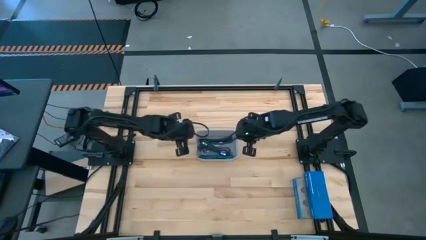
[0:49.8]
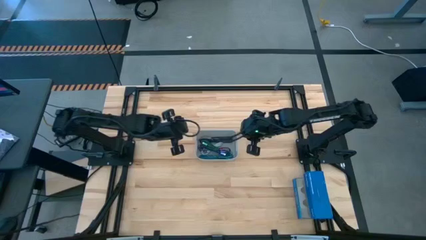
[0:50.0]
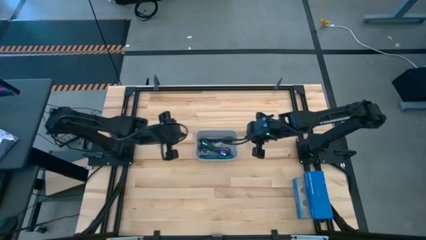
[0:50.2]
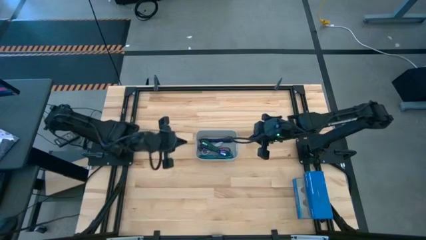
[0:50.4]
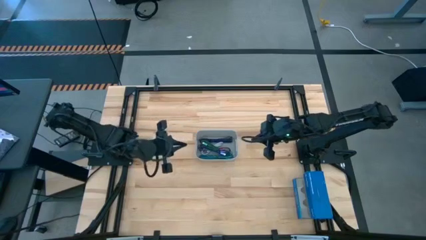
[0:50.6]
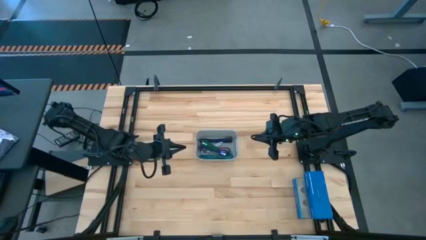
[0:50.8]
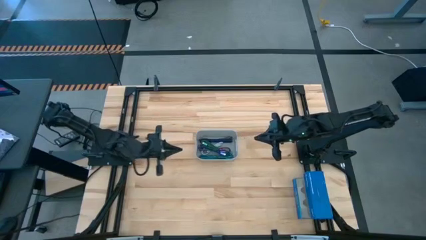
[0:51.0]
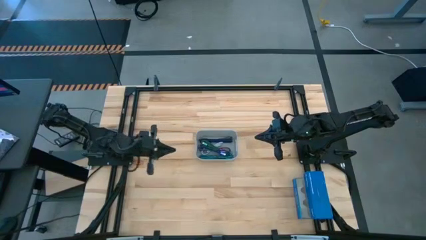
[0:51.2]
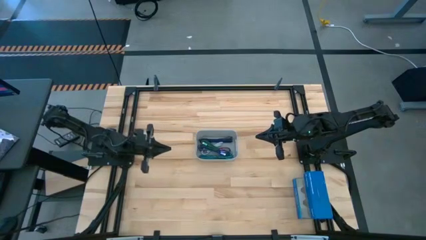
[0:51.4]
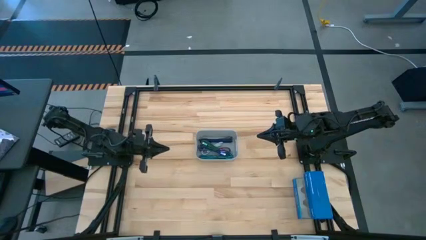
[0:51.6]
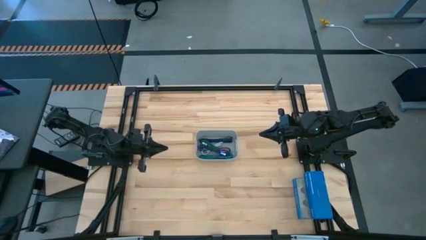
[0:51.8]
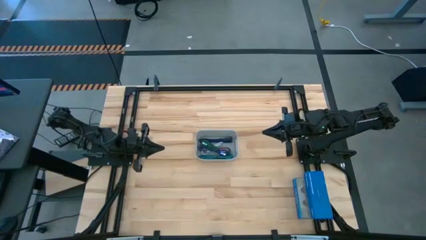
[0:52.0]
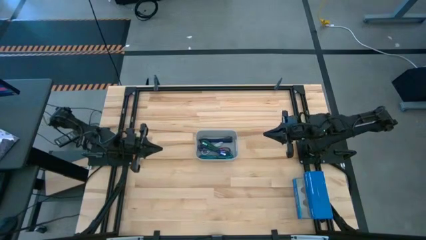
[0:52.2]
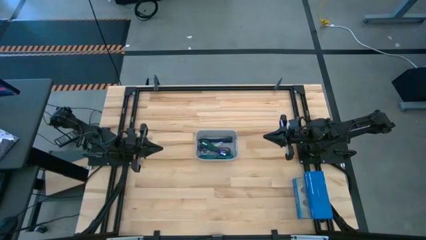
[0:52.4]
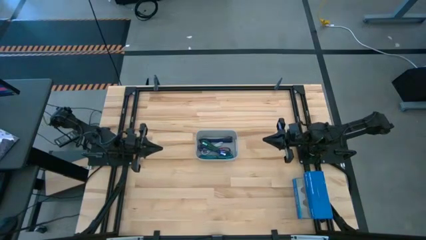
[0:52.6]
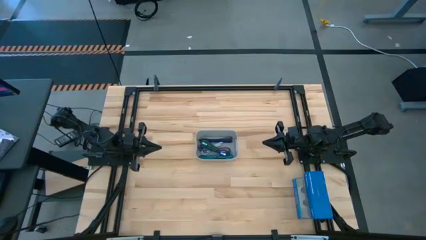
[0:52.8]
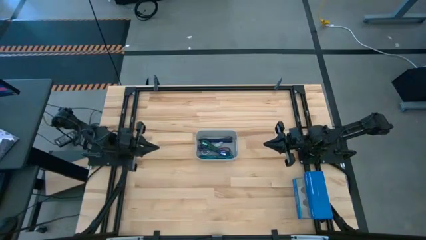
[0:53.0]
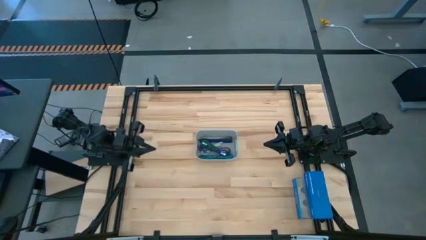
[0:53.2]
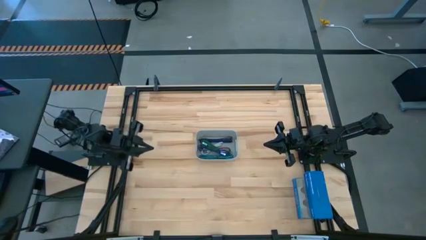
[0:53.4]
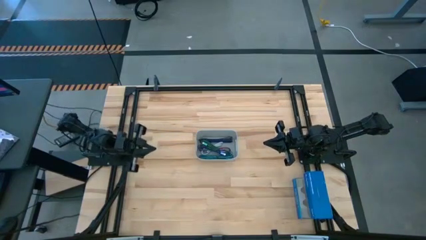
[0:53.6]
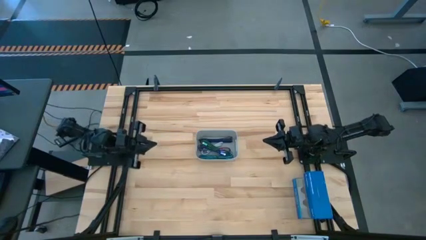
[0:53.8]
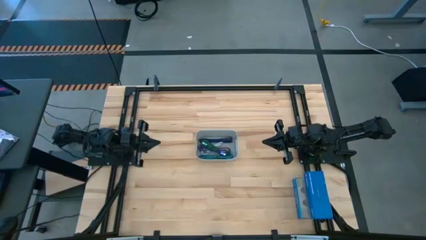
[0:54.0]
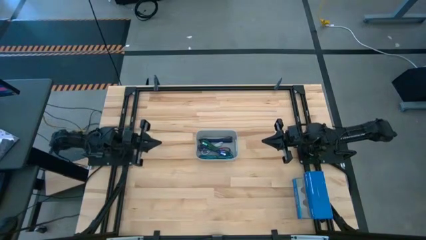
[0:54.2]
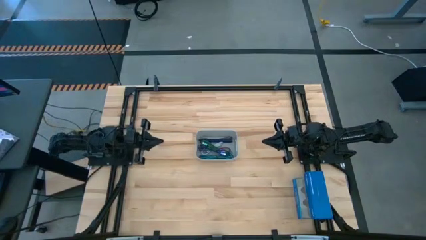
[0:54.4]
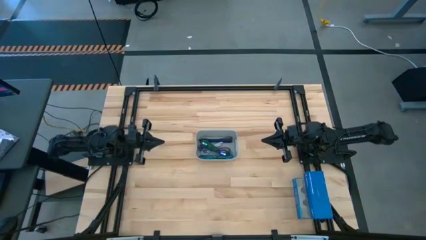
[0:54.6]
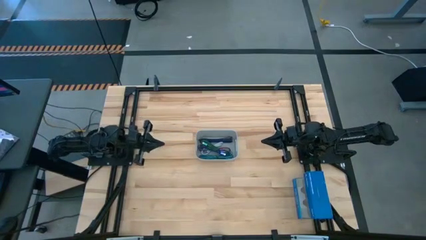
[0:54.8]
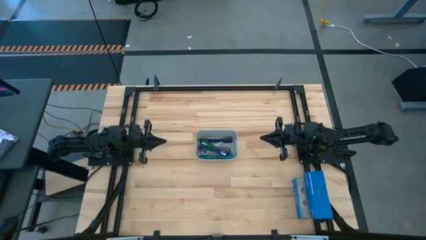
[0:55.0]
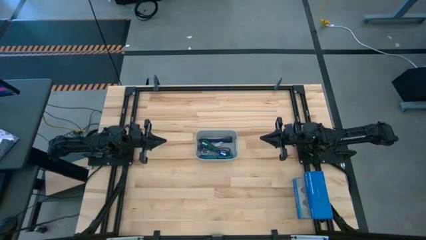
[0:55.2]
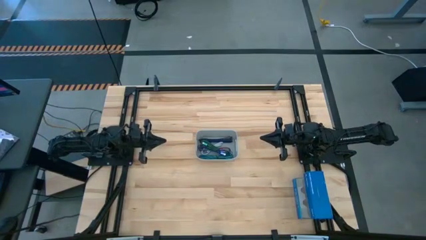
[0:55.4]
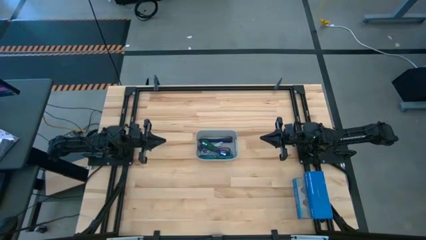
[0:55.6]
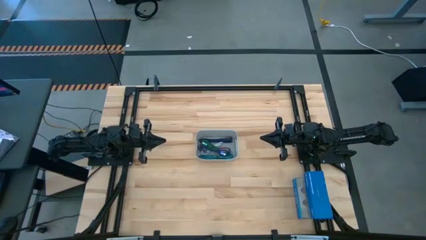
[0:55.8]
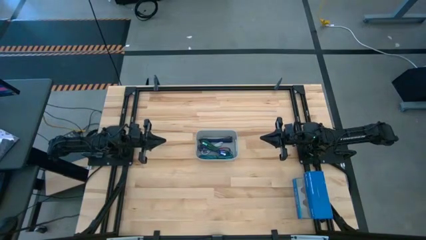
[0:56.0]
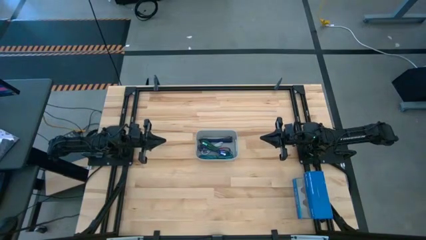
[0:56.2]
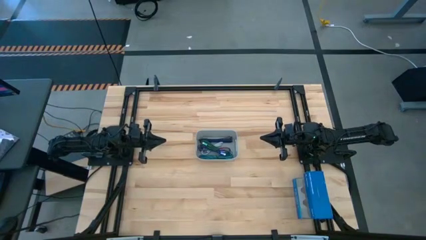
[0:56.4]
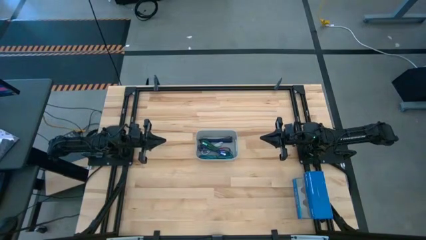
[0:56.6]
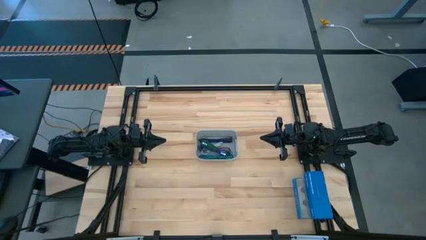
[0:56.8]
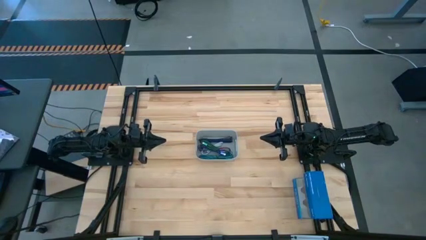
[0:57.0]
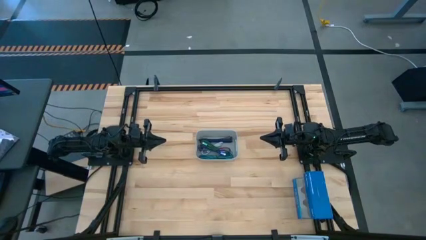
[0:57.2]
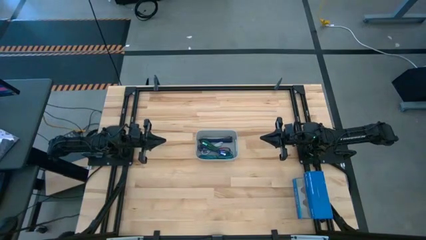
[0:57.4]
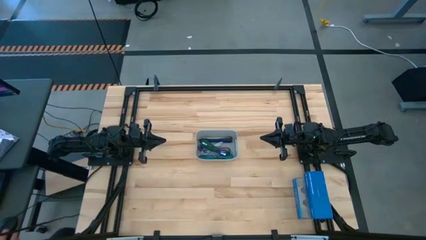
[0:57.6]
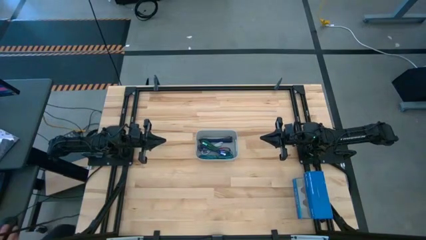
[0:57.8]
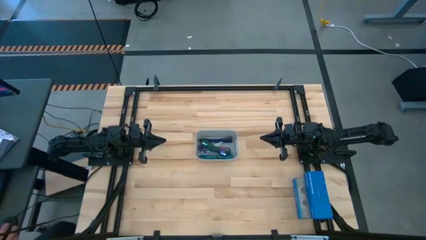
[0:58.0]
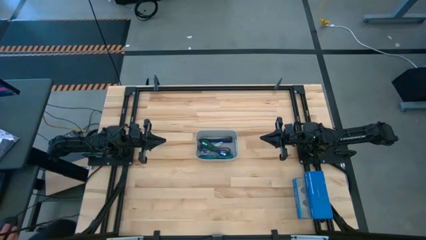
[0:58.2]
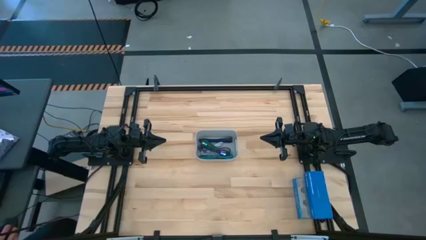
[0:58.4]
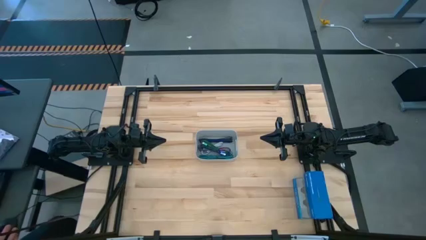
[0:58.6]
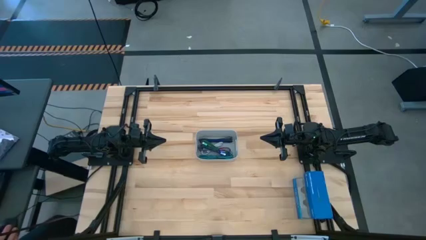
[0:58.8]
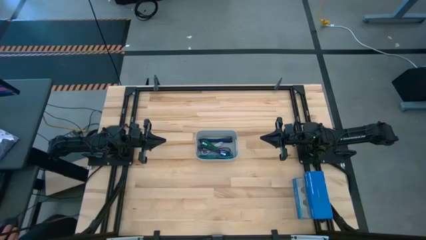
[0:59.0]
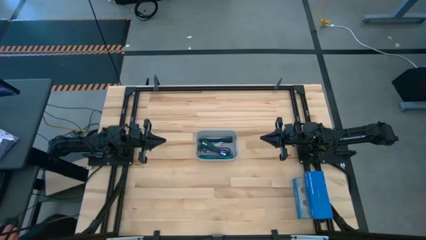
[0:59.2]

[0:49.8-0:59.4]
Task: Pick and place USB-C Cables
Return to Home Position

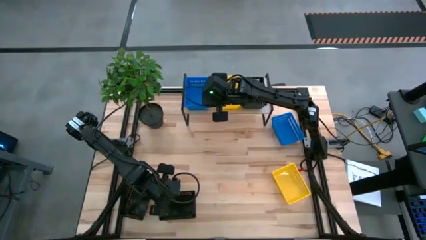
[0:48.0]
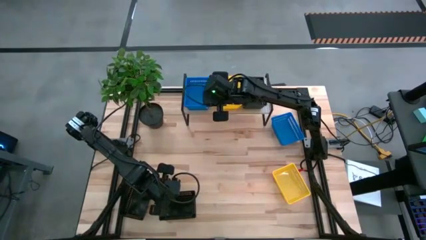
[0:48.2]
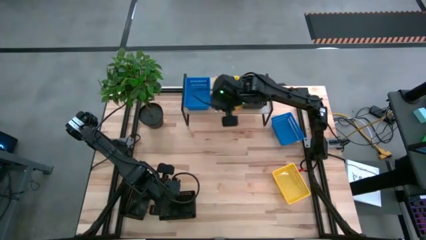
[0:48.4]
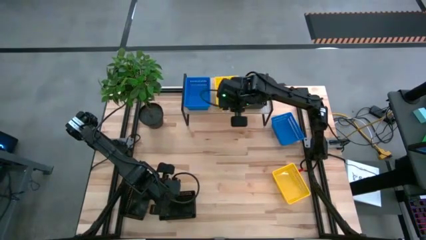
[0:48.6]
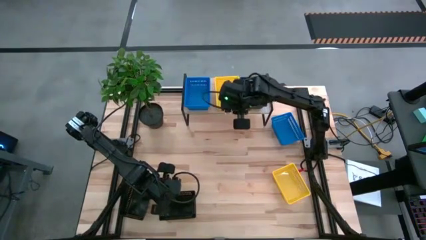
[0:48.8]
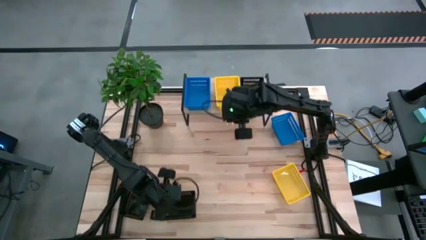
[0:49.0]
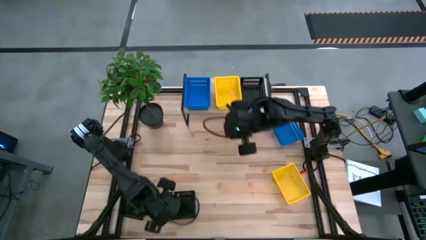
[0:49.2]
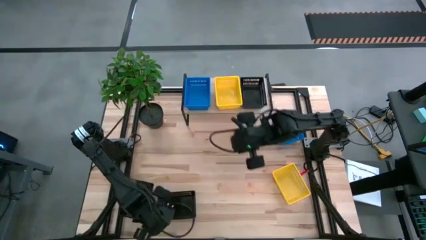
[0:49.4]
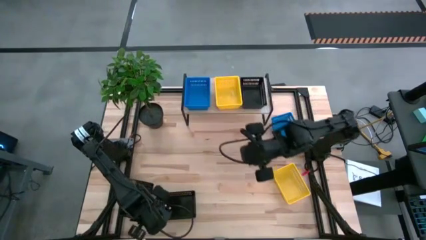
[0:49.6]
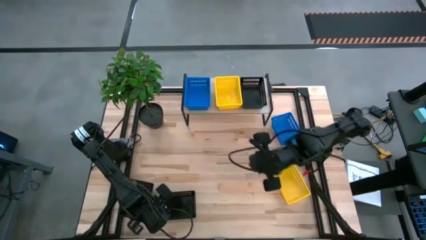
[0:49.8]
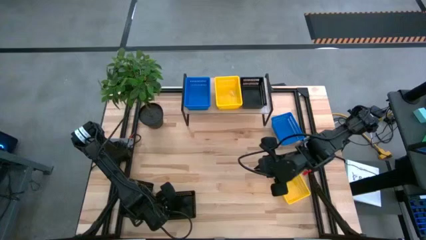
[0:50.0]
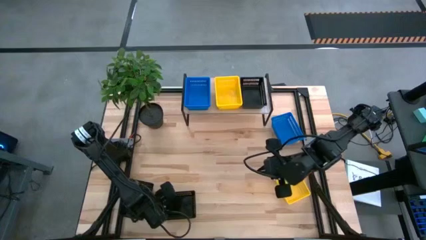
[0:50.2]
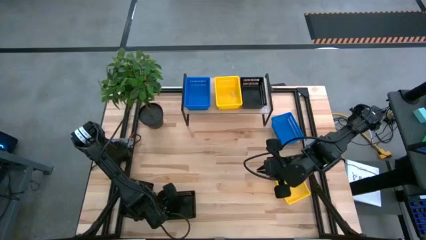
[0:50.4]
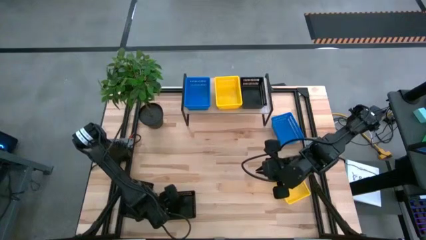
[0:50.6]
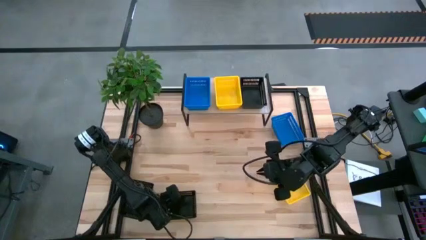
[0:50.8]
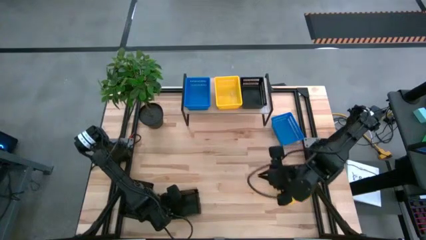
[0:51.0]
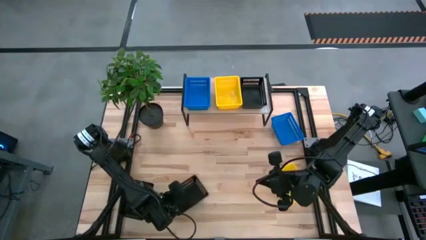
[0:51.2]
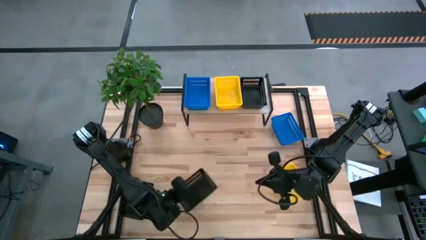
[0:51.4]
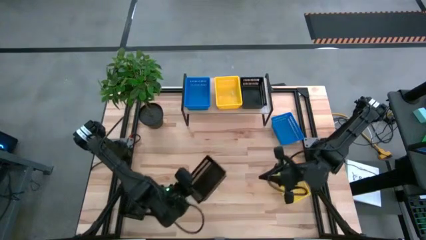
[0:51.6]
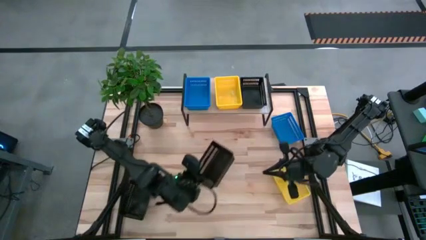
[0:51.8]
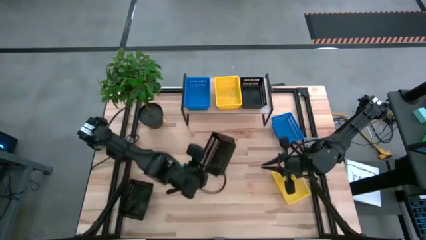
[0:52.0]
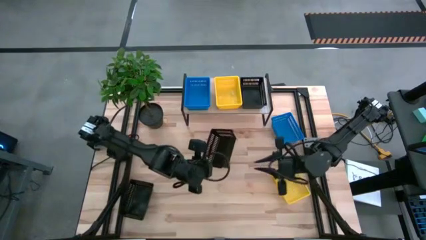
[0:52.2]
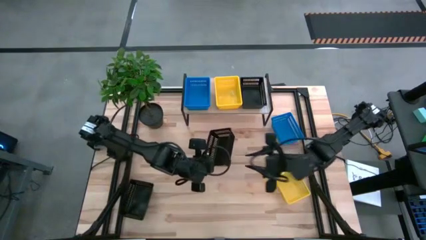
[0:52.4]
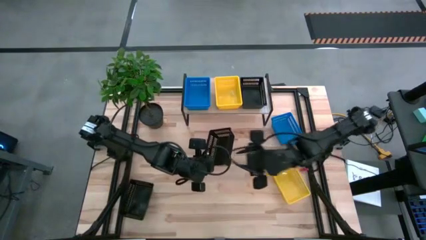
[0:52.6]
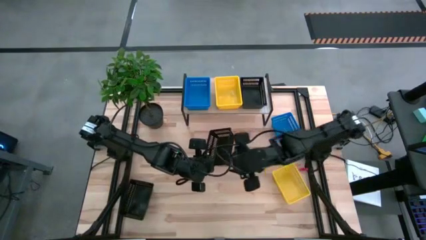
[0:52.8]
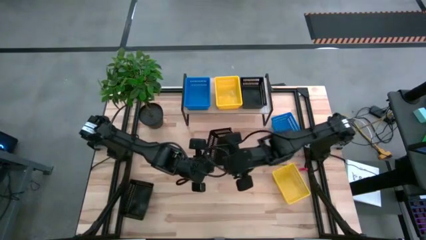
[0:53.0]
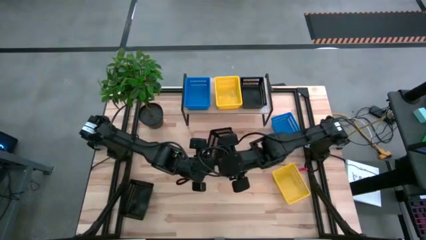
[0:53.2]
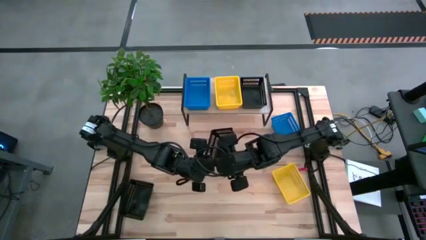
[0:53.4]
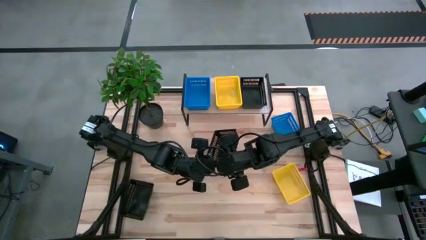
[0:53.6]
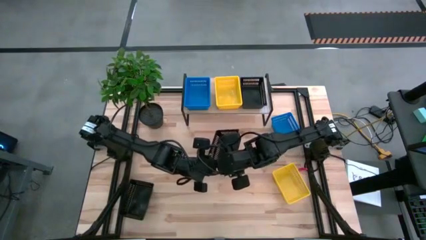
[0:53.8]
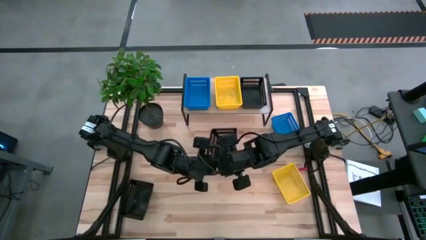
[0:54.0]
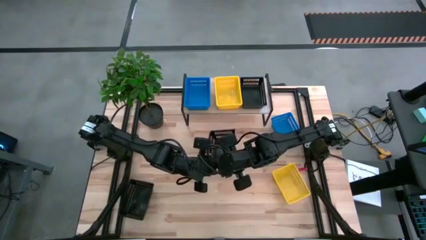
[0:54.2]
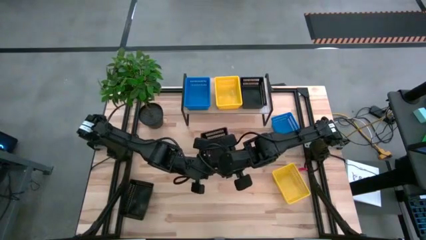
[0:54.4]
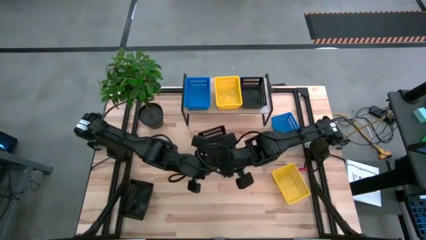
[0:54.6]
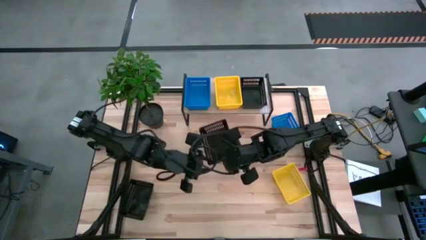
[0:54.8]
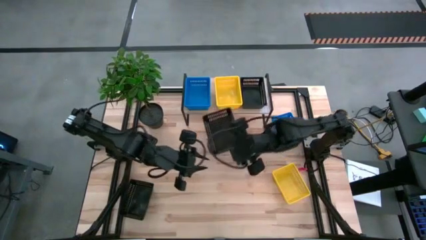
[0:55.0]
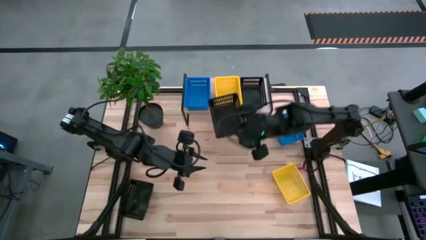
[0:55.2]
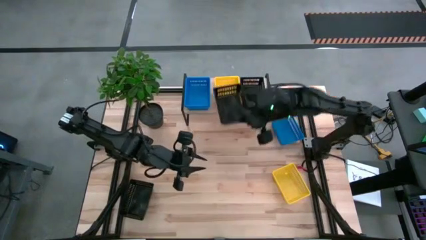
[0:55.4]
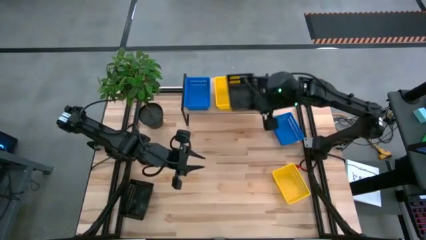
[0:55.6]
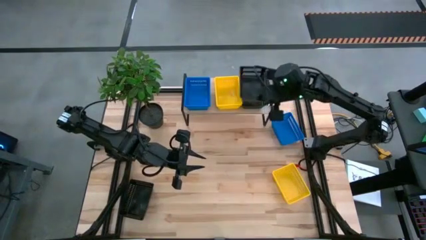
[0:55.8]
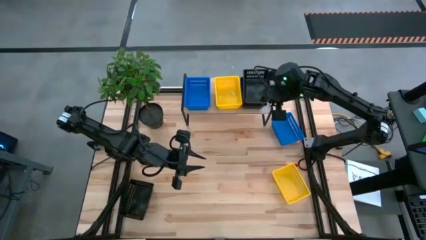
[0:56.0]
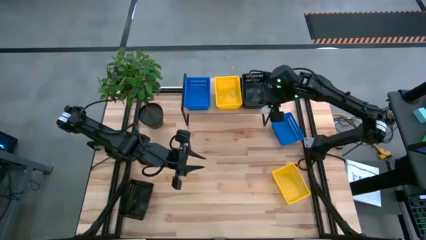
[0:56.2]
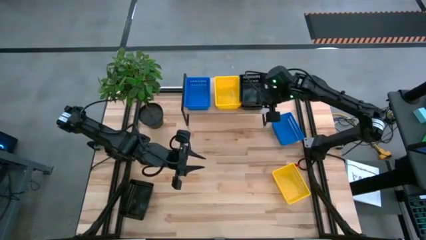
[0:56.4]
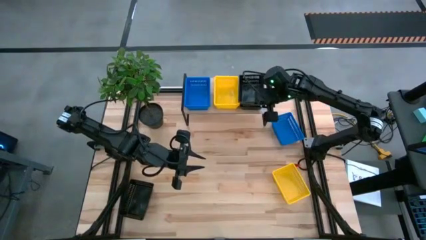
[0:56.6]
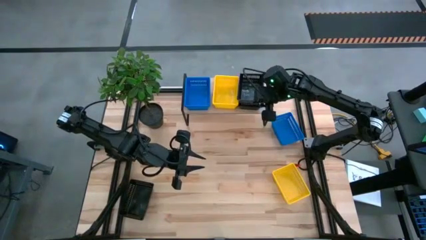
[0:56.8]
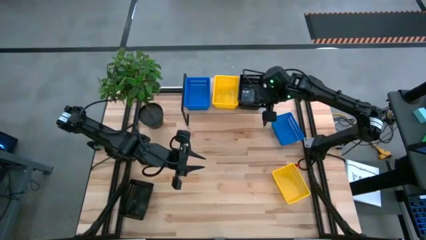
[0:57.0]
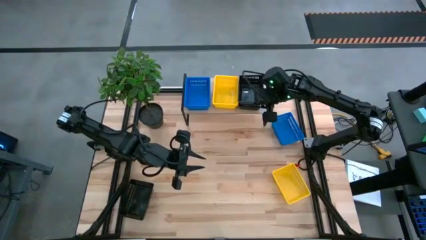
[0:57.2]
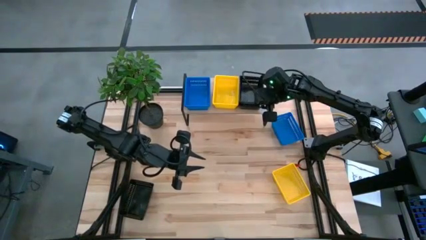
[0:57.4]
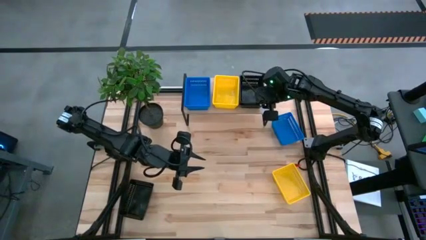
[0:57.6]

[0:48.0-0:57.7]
Task: Stack baskets on shelf by color
Stack the right black bin on top of the other black bin on the shelf
